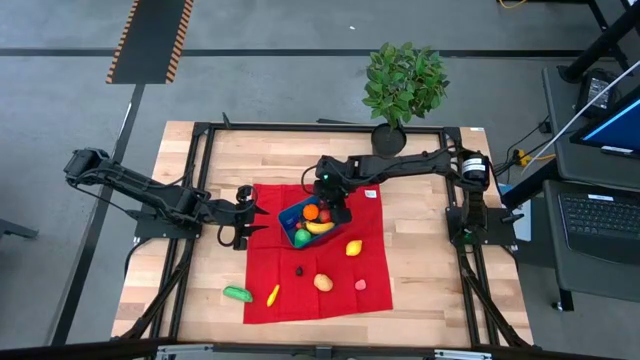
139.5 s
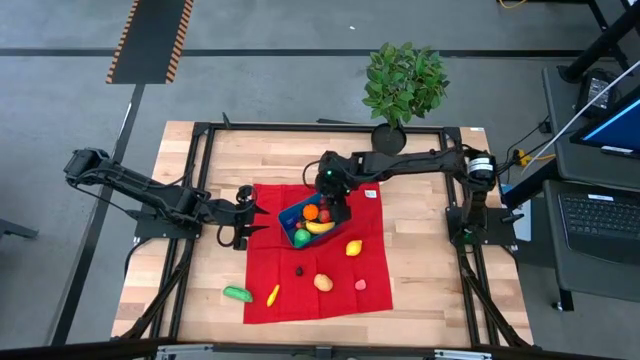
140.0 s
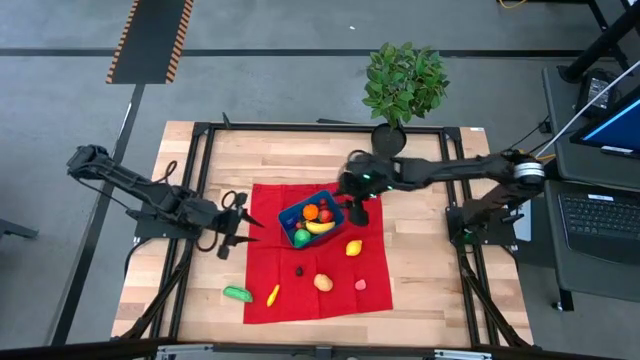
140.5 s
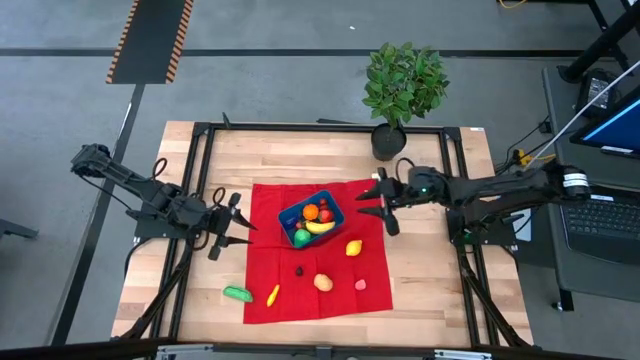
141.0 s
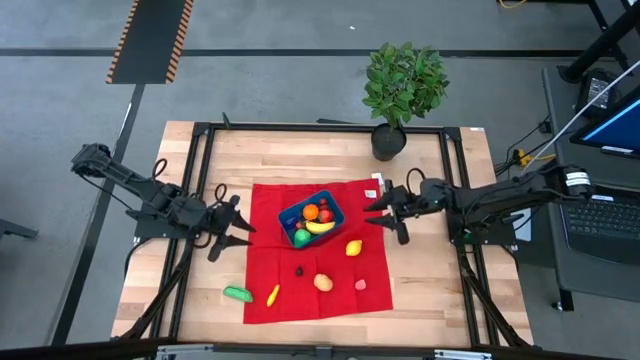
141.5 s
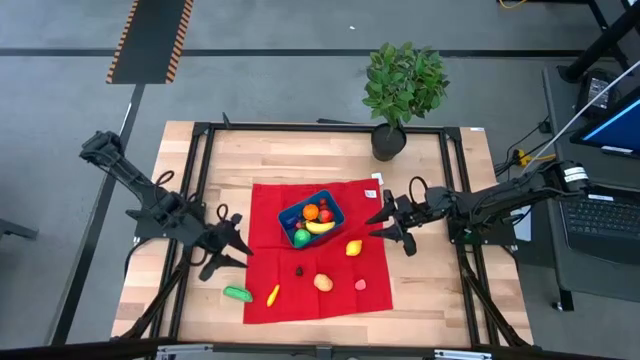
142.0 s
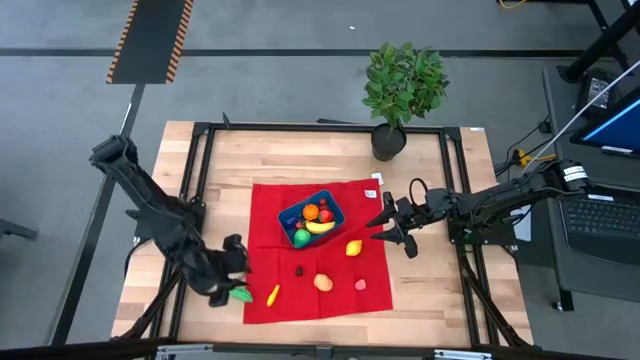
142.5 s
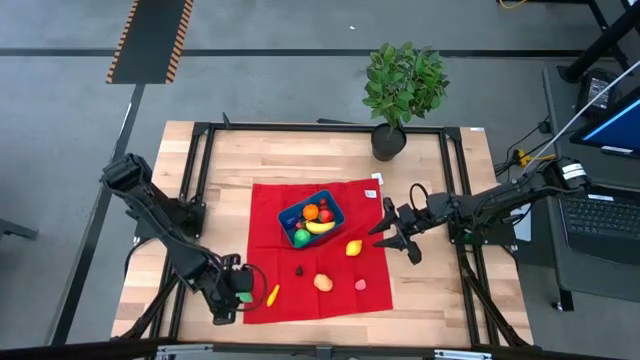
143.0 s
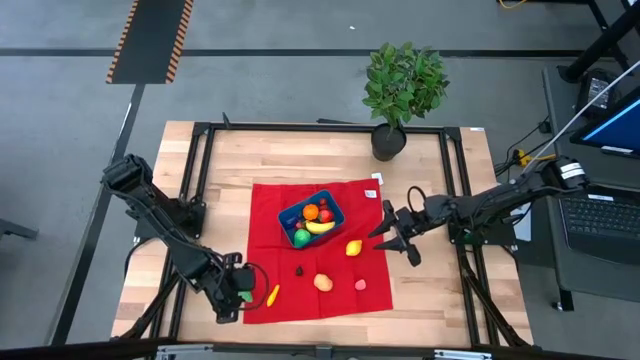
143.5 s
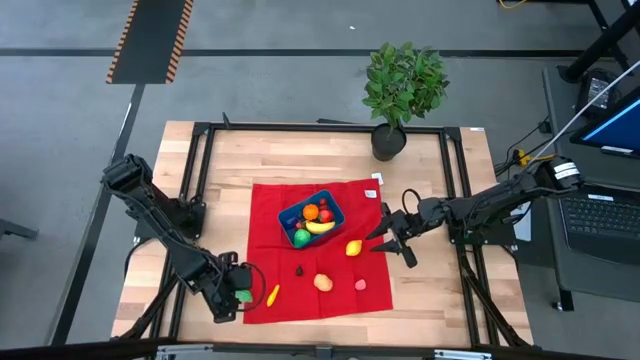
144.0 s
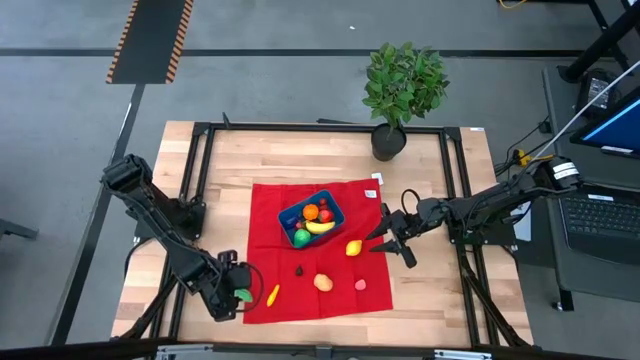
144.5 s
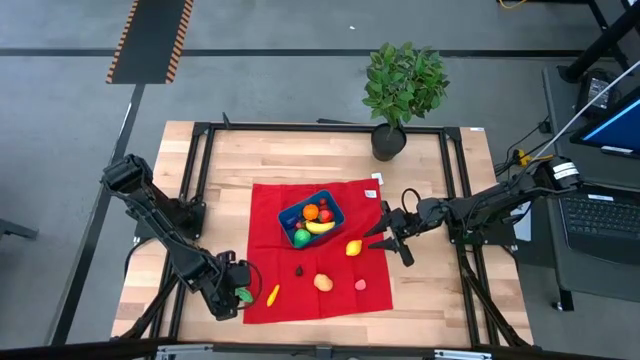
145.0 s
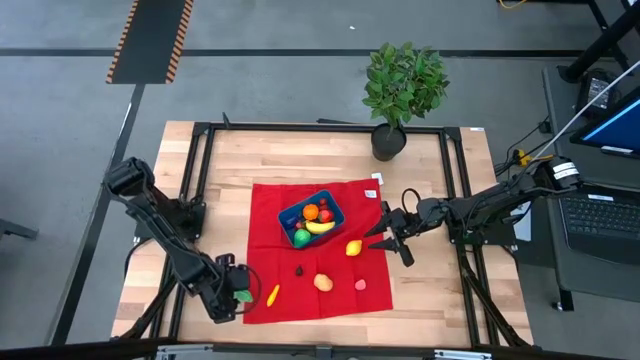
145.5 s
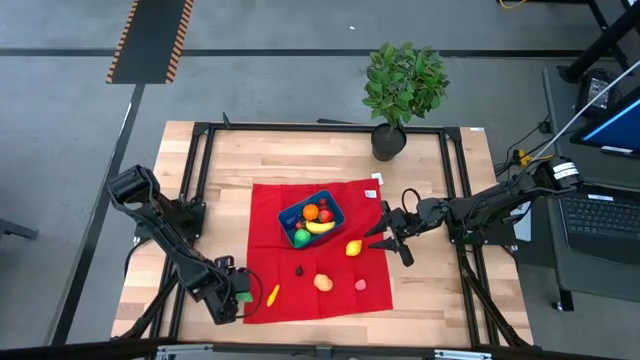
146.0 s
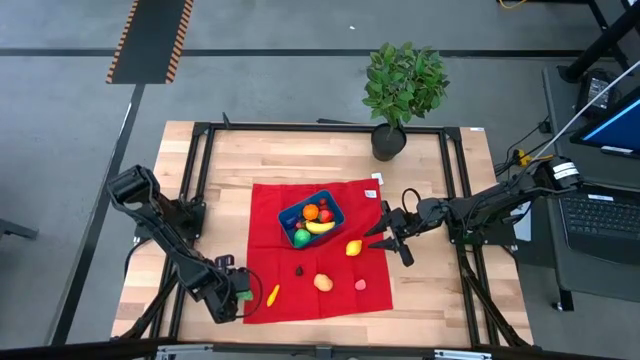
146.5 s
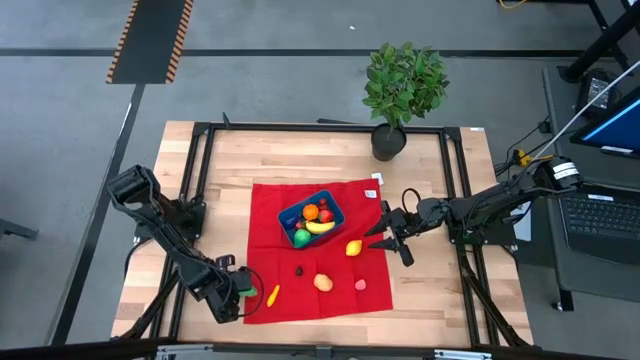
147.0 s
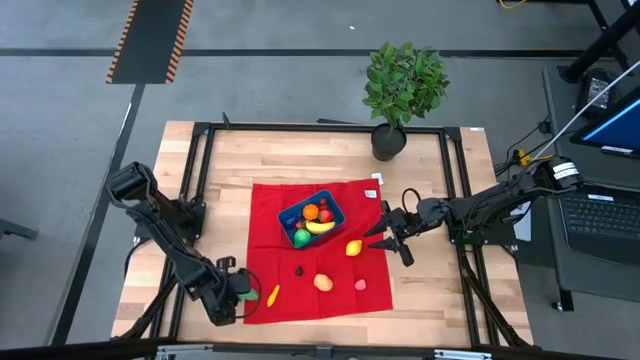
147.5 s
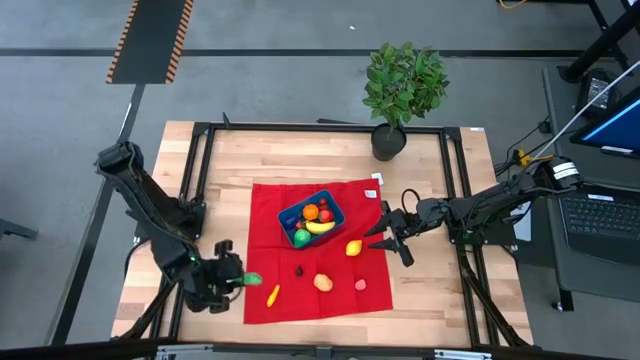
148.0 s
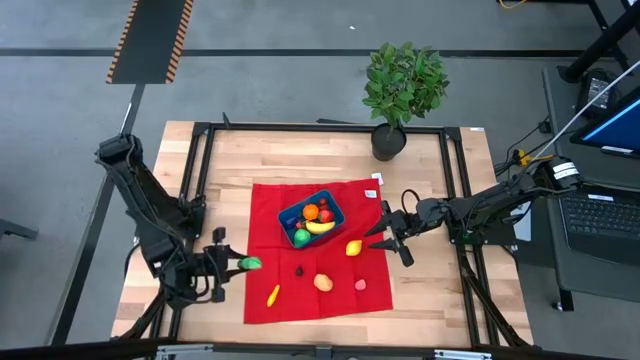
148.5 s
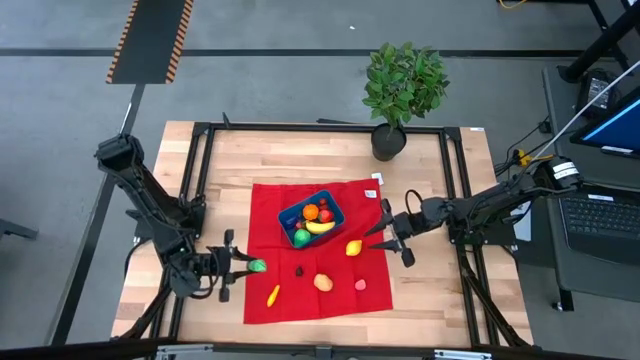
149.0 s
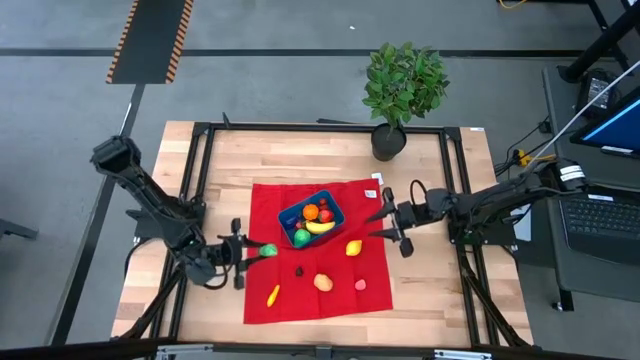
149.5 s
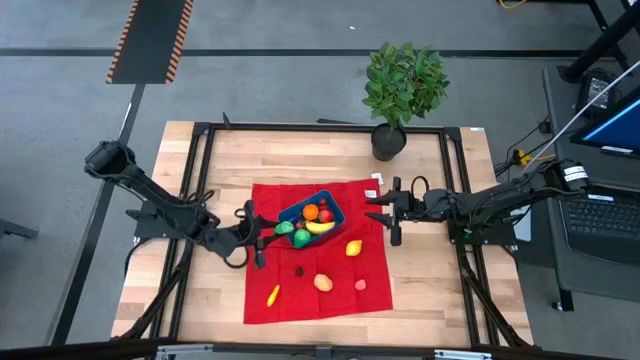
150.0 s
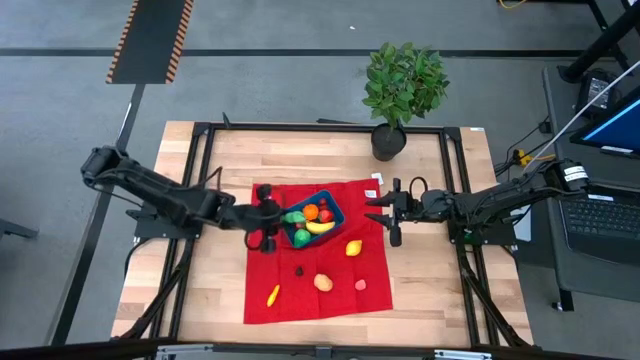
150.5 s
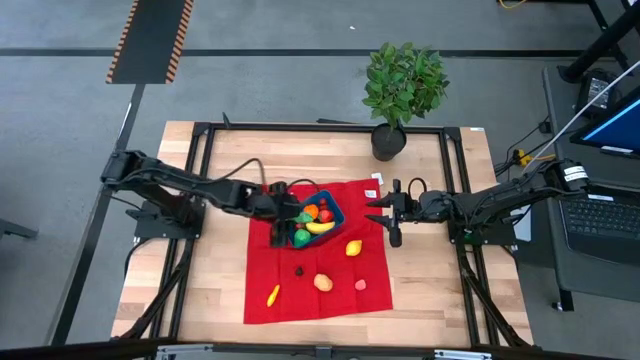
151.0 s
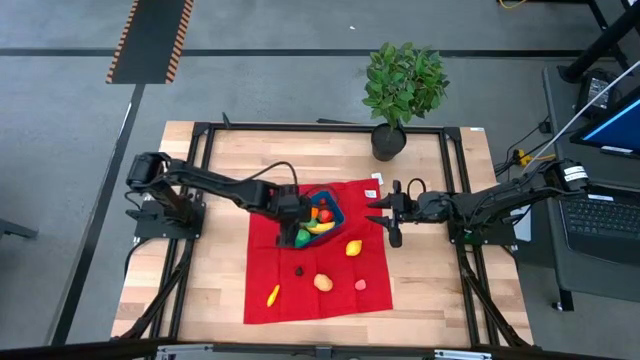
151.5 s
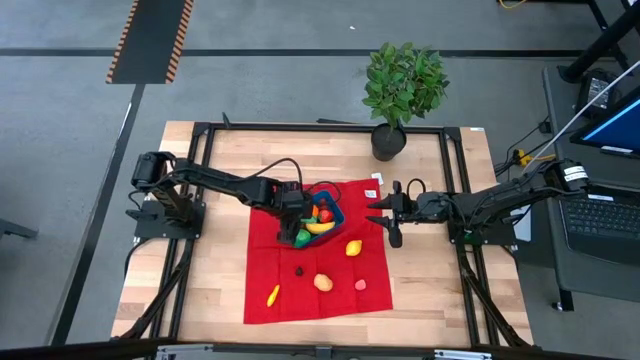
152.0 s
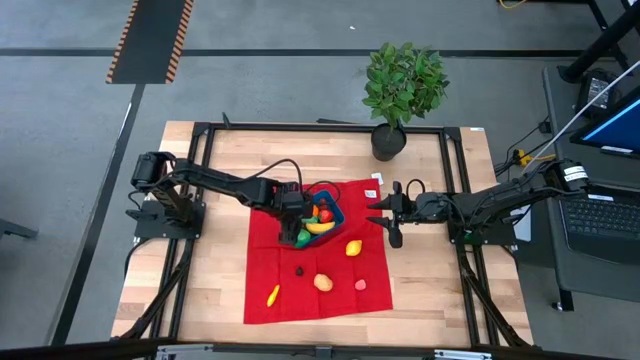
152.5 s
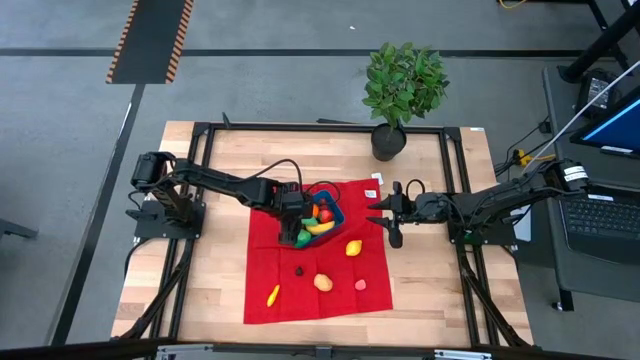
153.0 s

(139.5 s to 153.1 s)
Task: Pick and placing Produce into tupperware
Put the peas into the blue bin

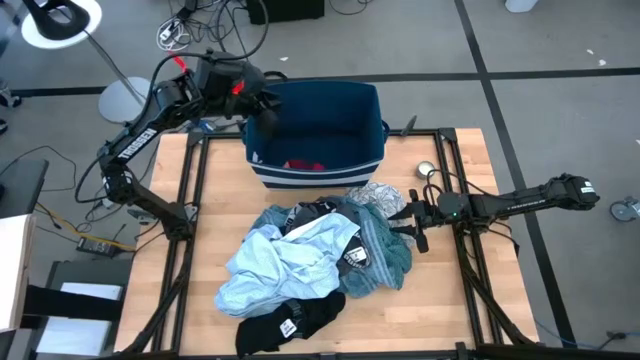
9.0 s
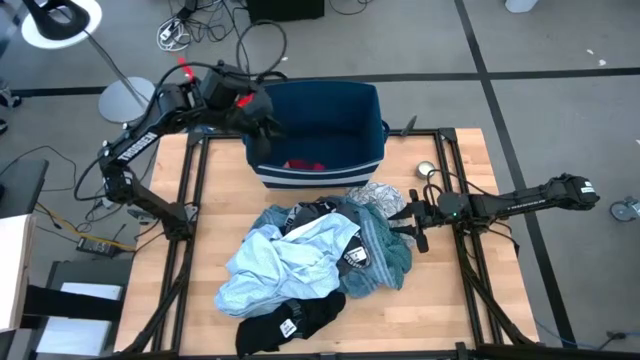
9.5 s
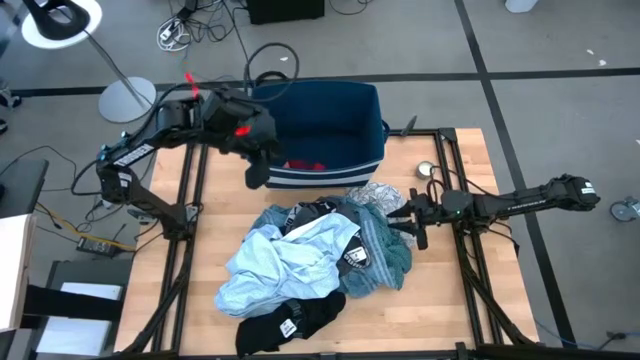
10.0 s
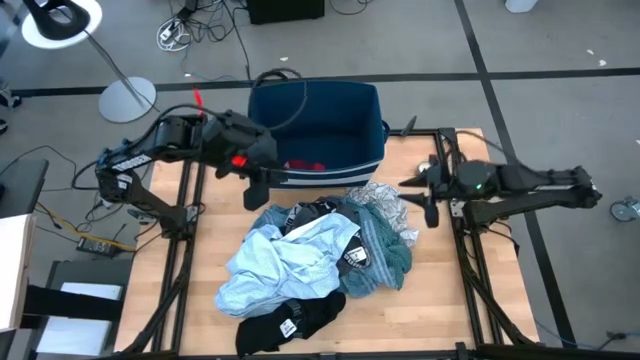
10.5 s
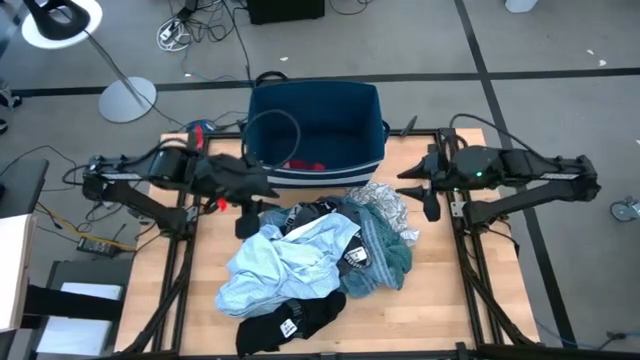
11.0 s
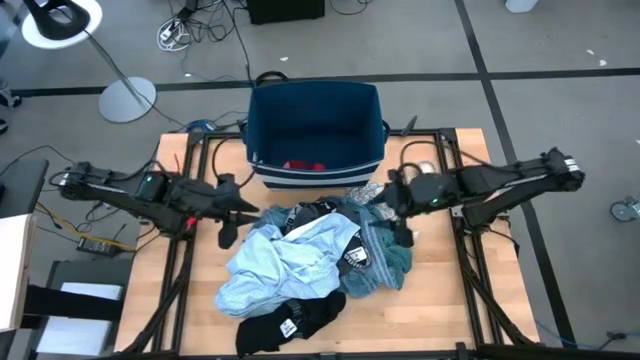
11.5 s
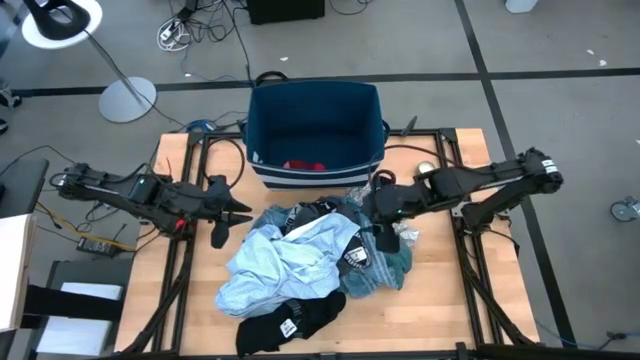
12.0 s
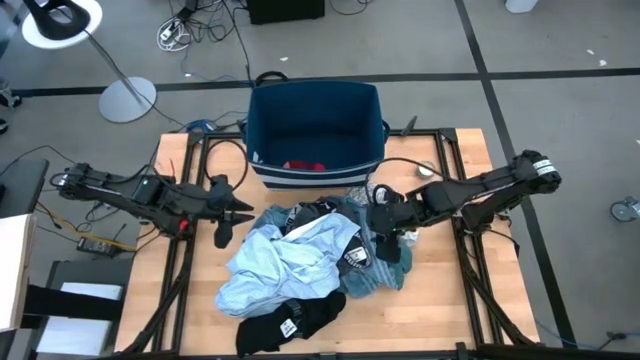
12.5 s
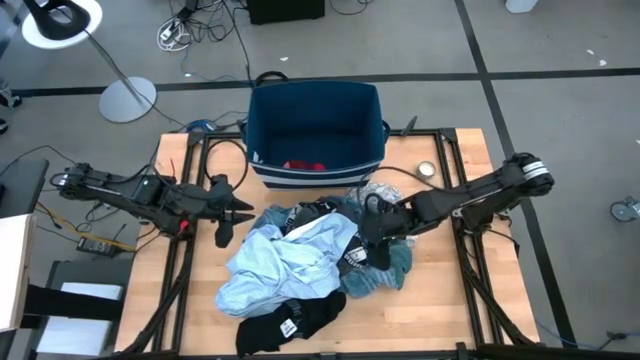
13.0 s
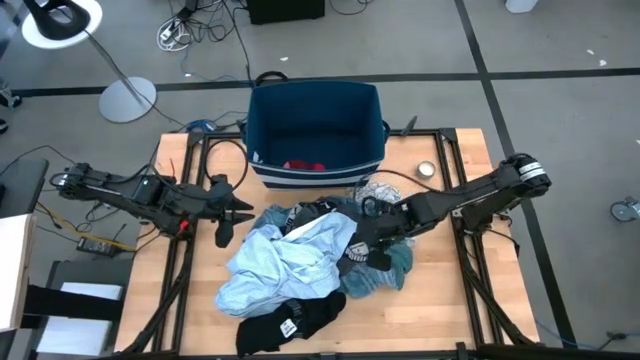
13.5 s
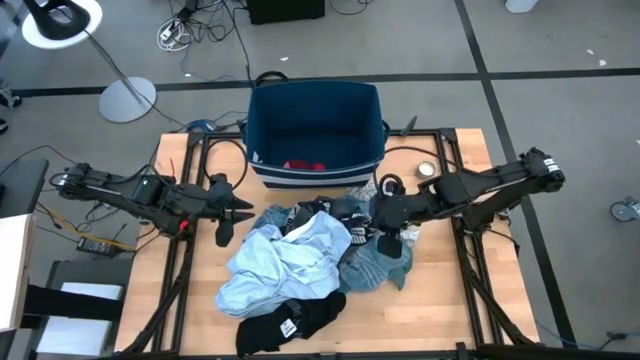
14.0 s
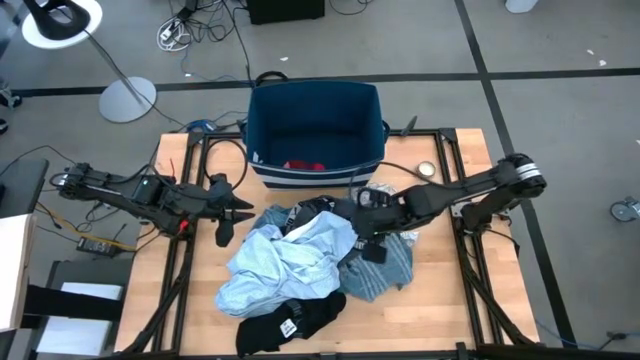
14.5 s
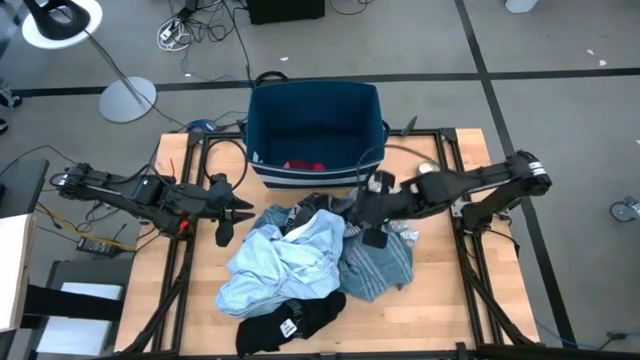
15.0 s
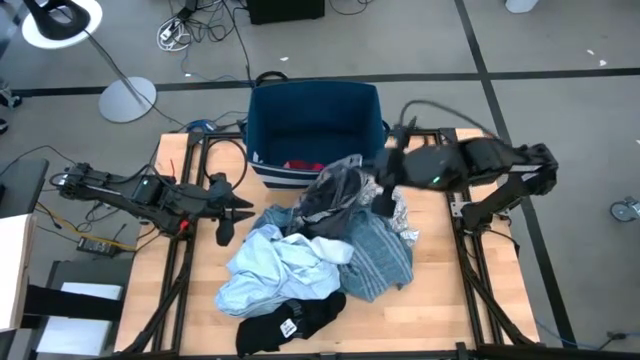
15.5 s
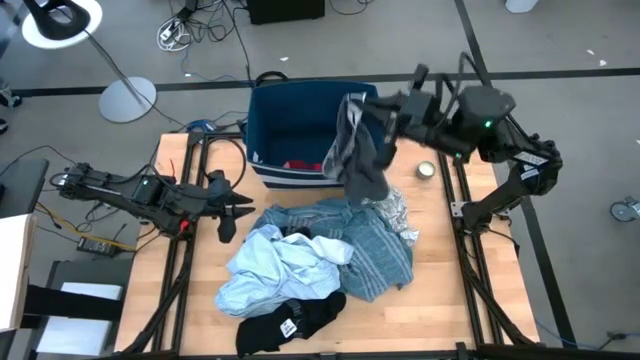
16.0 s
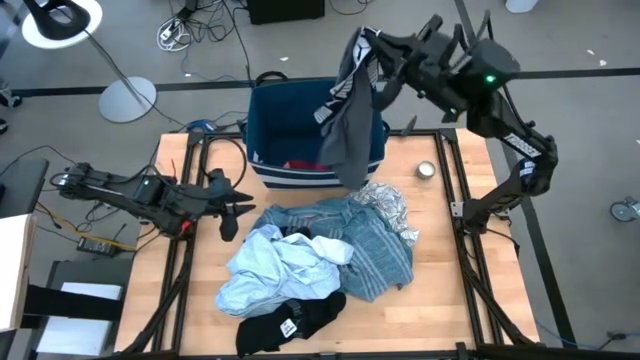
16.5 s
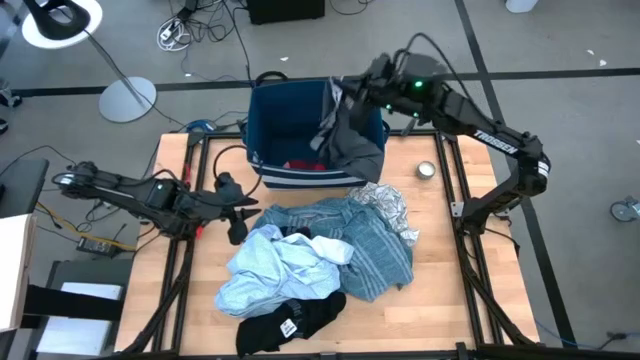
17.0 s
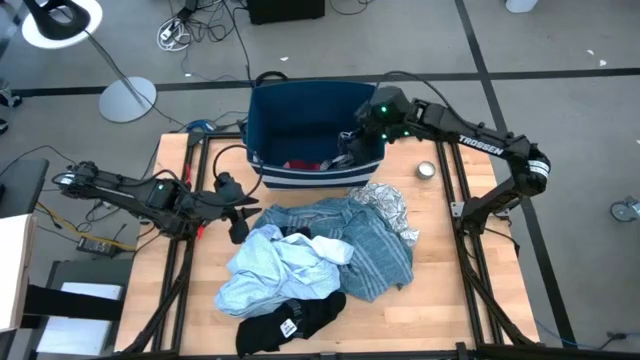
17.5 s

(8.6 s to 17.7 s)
Task: Sort clothes
Put the gray boxer into the blue laundry organizer

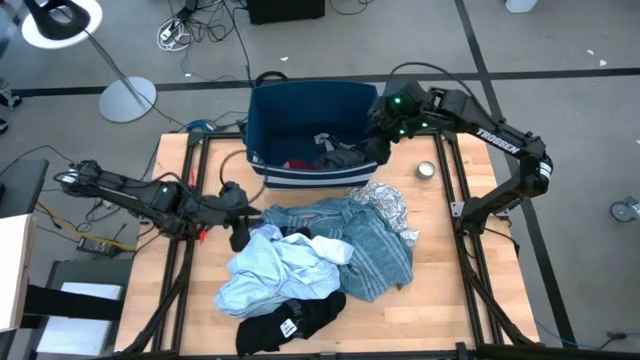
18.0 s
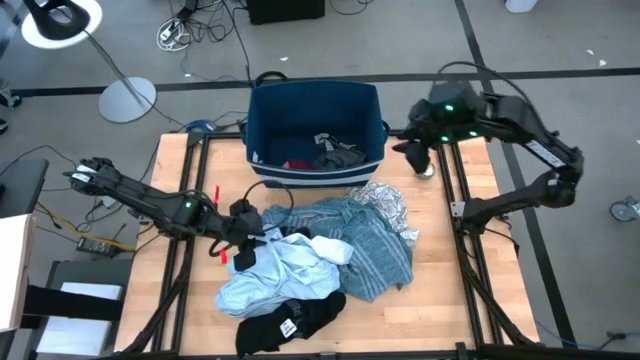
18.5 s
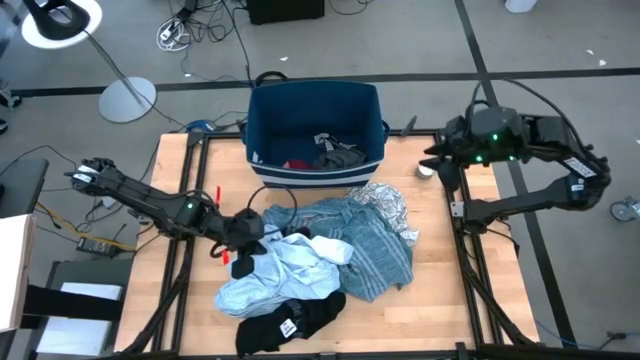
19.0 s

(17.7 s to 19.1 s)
Put the light blue shirt into the blue laundry organizer
